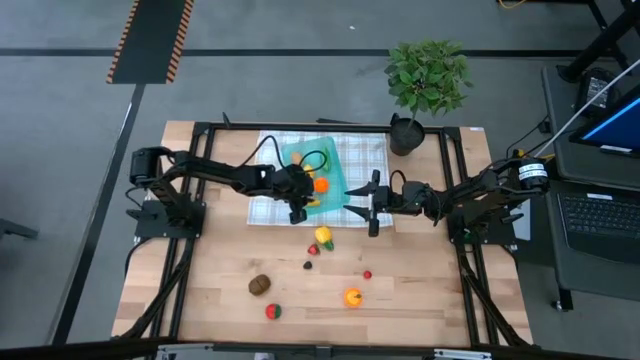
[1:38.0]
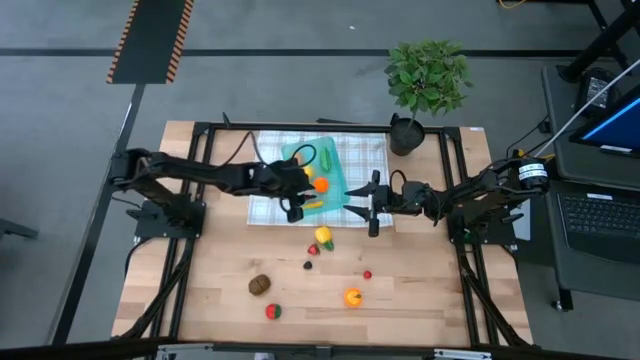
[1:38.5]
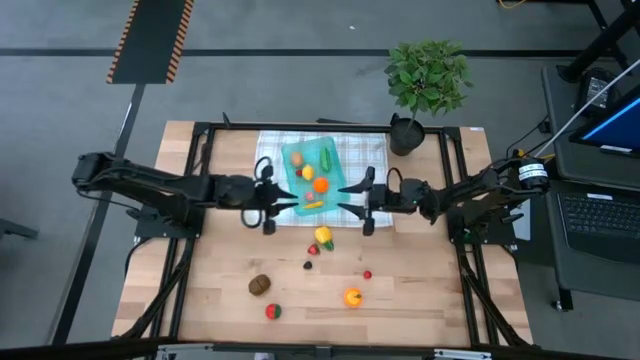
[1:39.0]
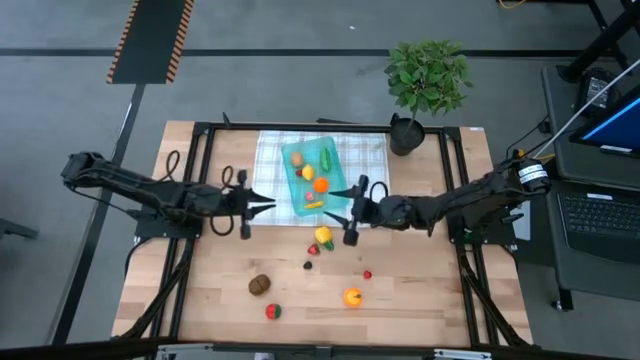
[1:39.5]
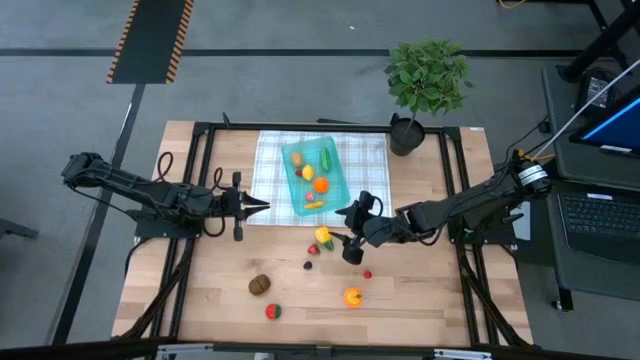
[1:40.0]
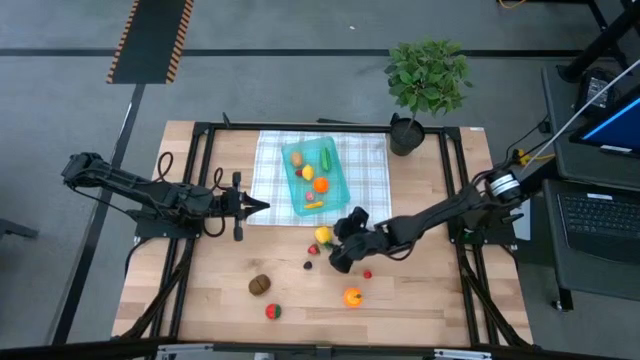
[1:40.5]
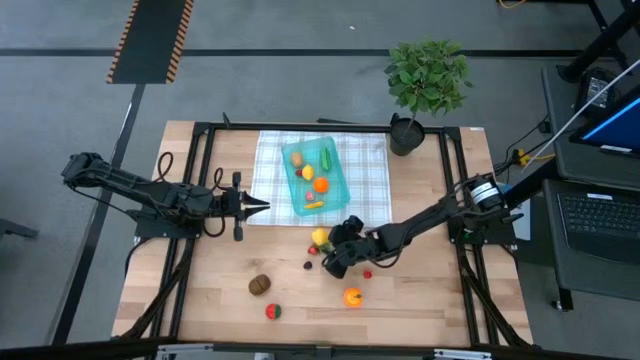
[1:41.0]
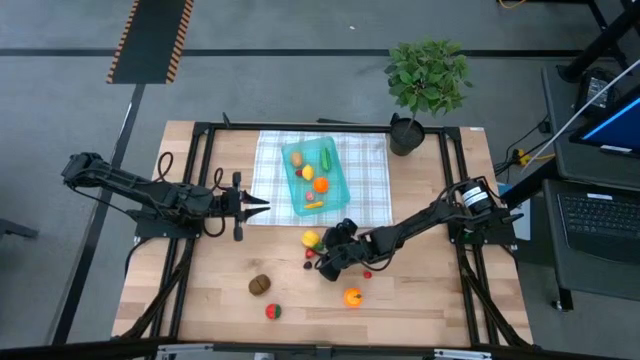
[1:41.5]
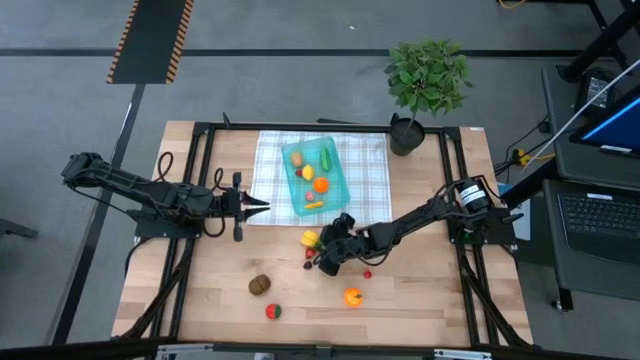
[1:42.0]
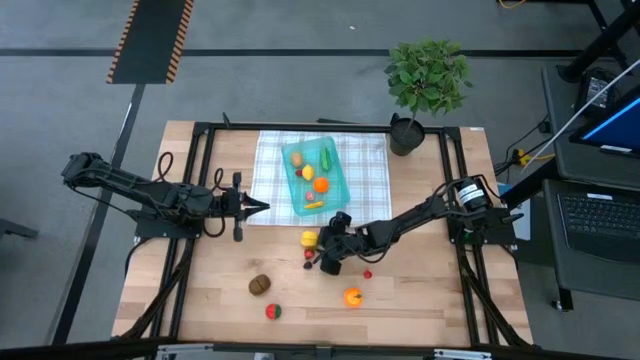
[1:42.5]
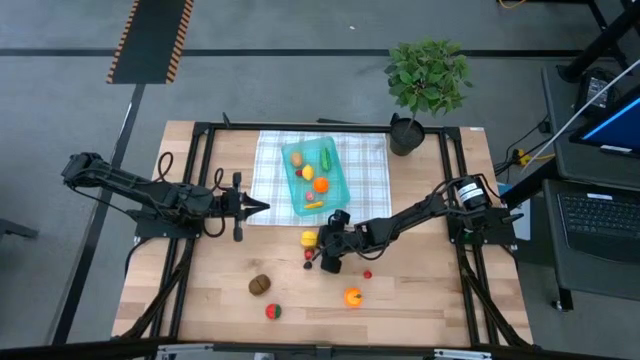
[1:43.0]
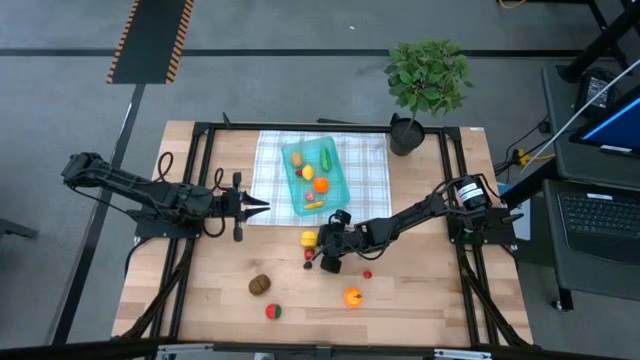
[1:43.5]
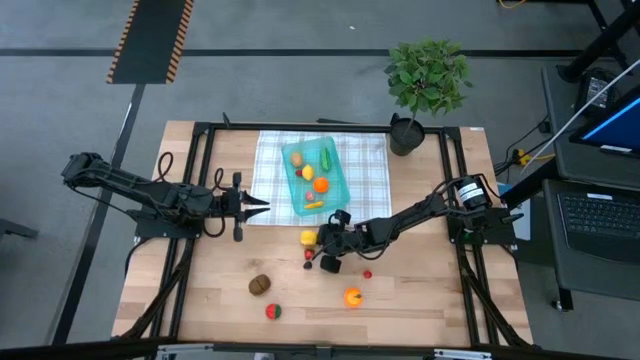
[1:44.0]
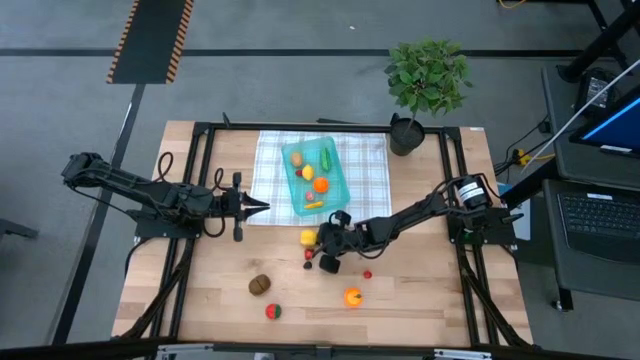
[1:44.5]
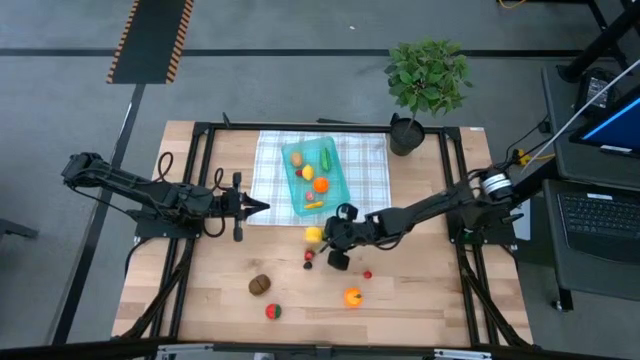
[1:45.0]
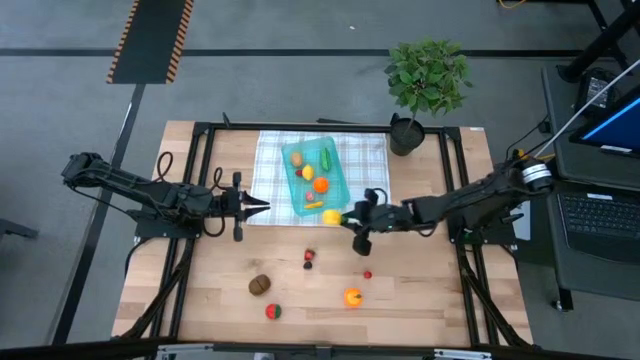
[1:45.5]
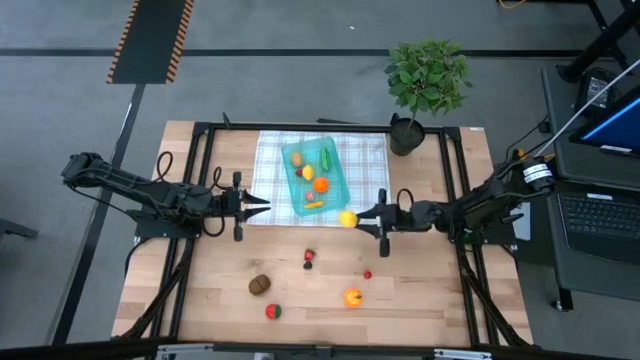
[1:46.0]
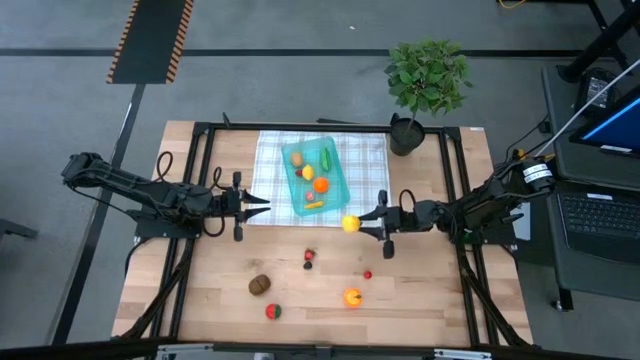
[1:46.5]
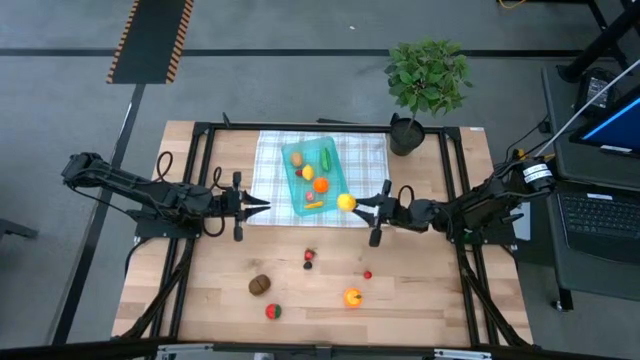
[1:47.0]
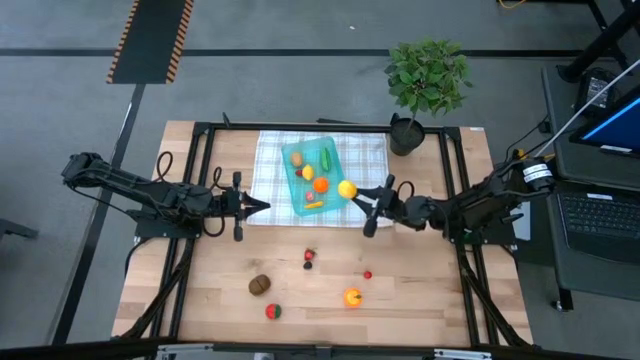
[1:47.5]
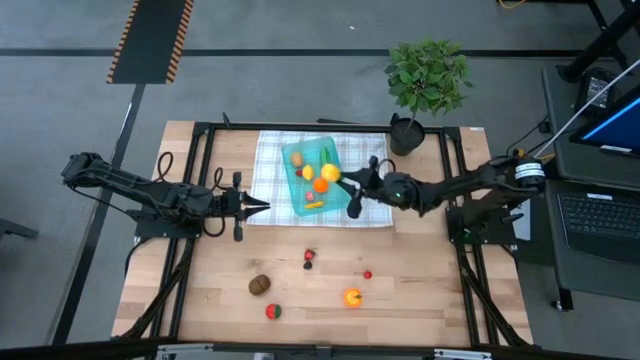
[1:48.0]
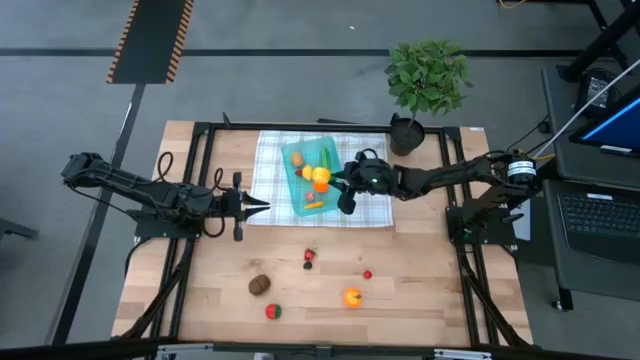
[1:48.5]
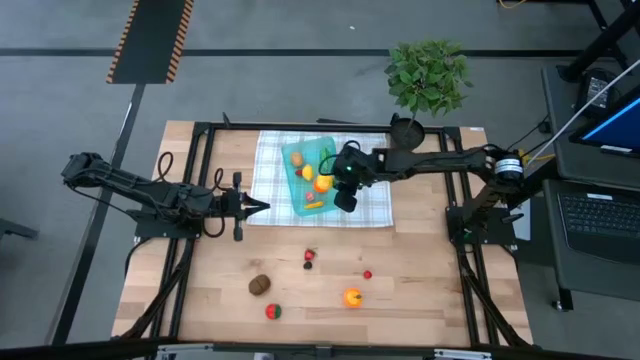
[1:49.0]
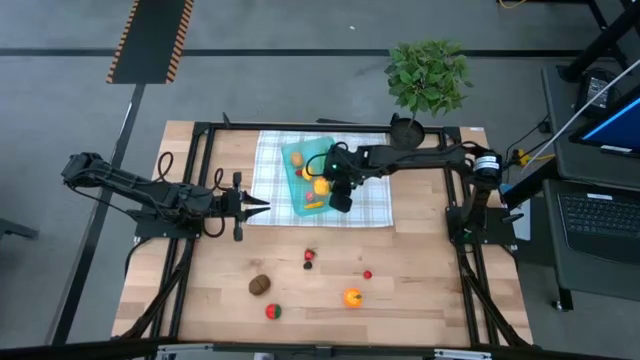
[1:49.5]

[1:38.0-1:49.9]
Task: Pick and placing Produce into tupperware
Put the yellow pineapple into the blue bin

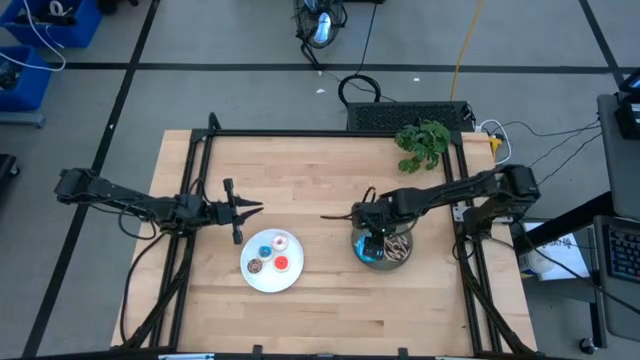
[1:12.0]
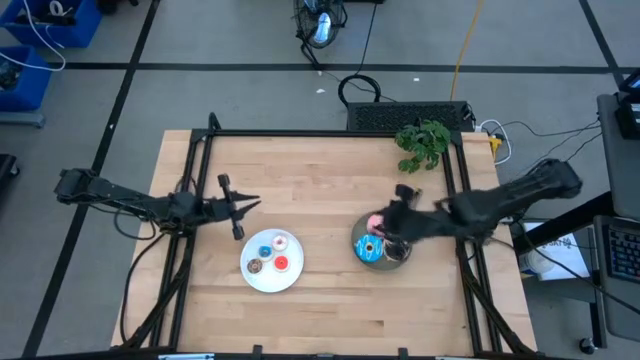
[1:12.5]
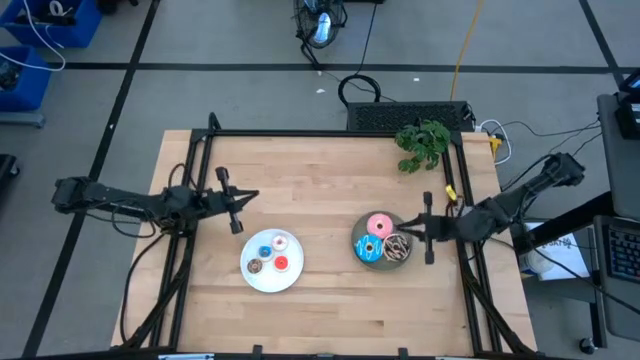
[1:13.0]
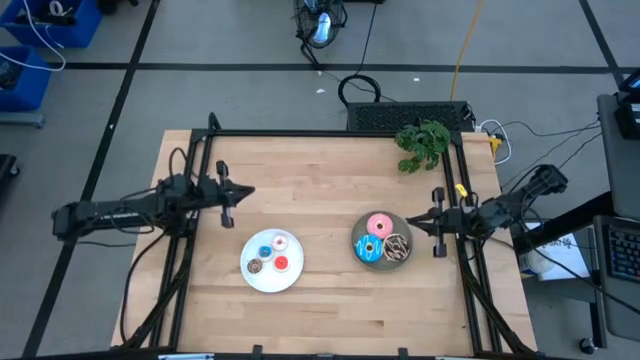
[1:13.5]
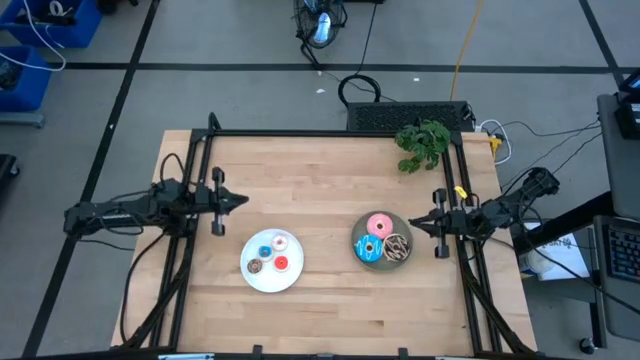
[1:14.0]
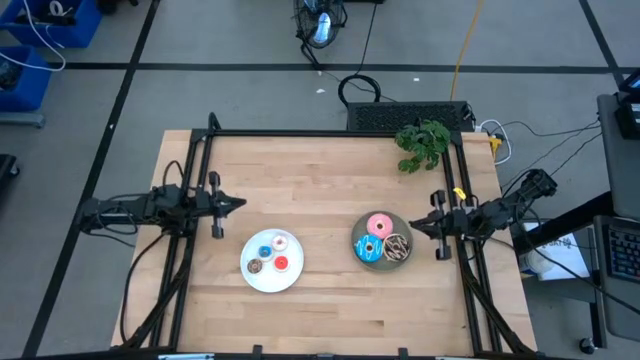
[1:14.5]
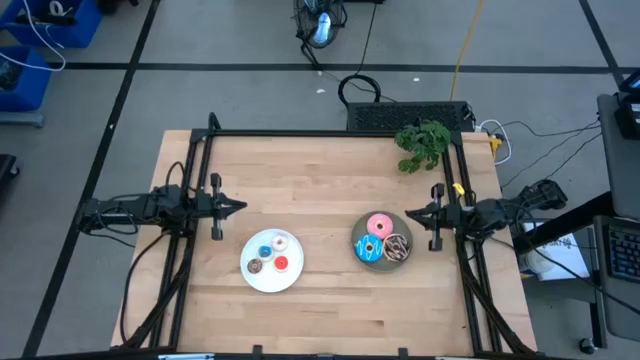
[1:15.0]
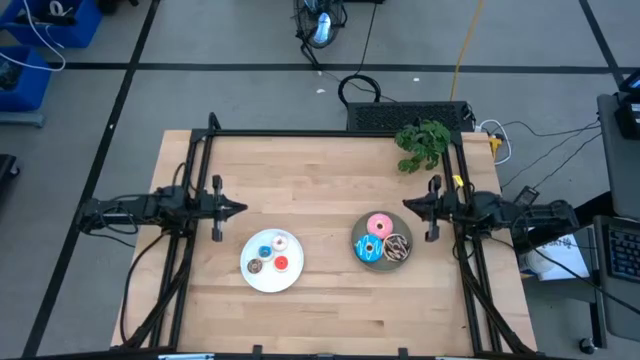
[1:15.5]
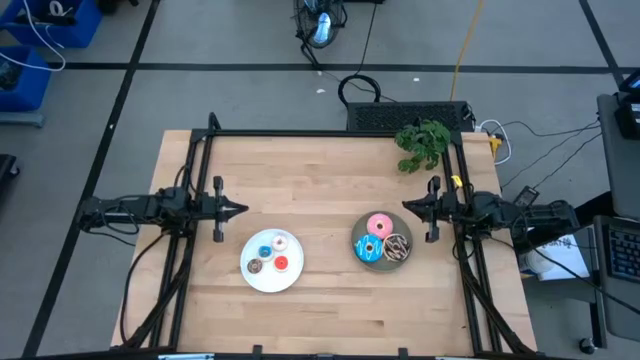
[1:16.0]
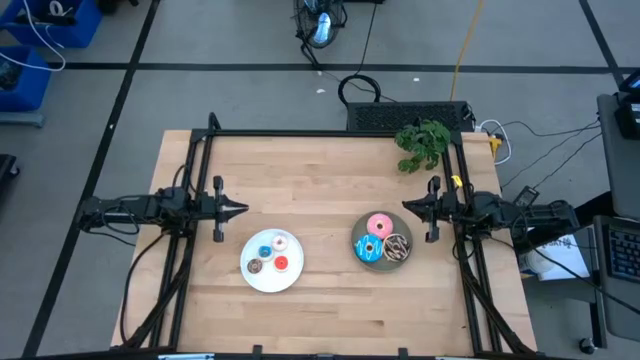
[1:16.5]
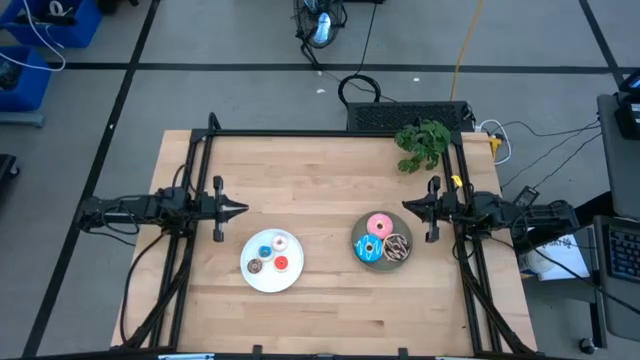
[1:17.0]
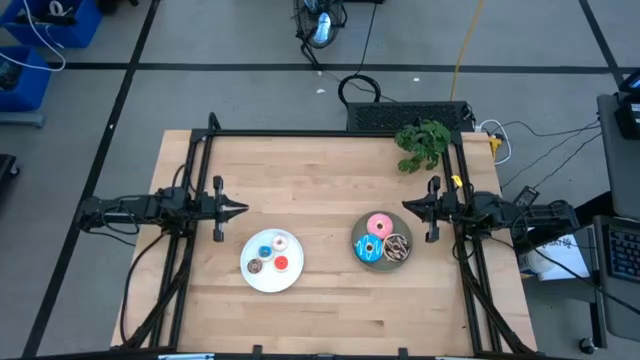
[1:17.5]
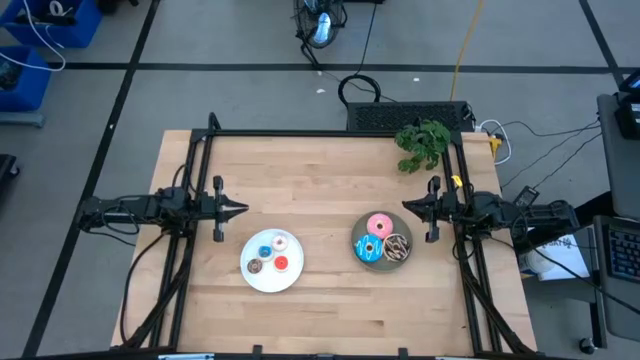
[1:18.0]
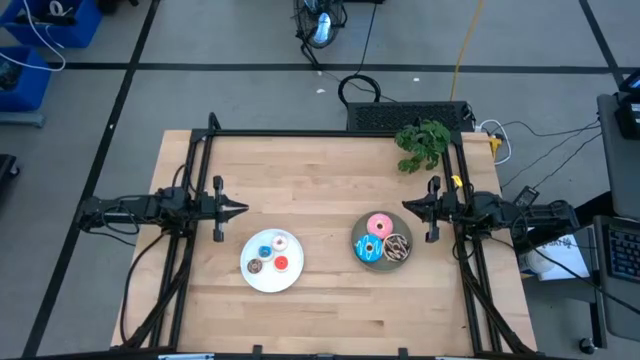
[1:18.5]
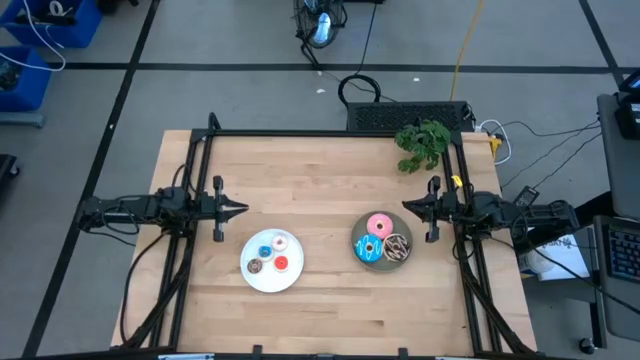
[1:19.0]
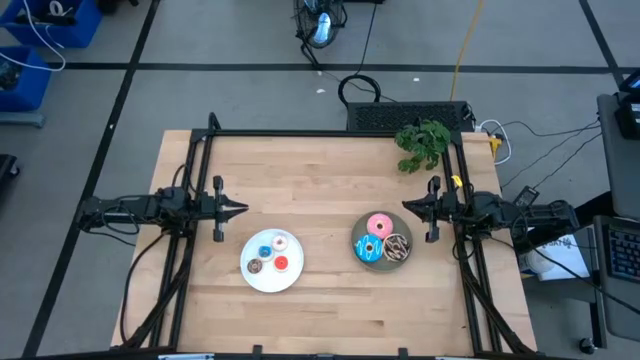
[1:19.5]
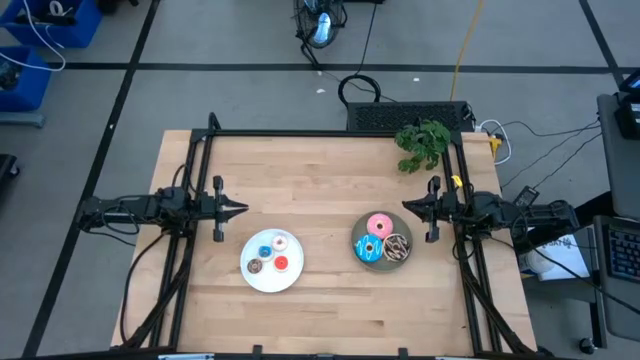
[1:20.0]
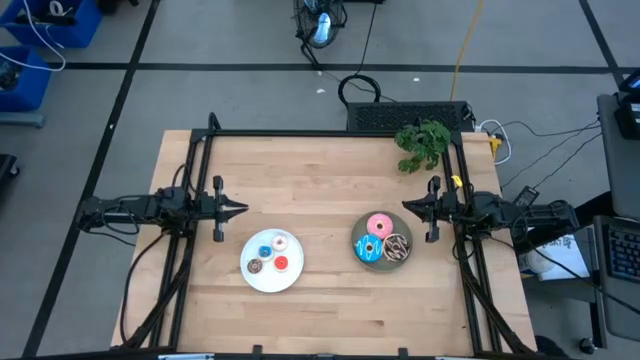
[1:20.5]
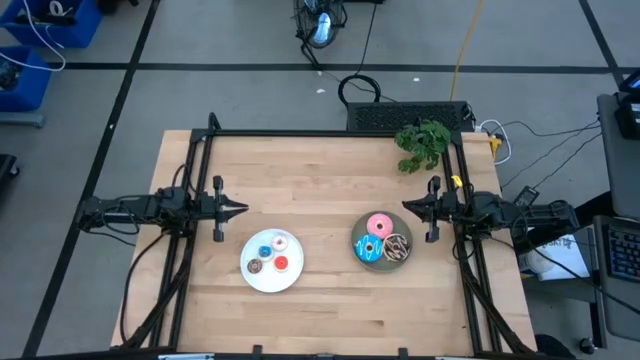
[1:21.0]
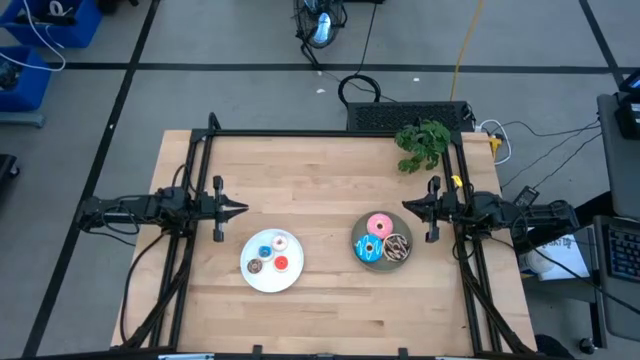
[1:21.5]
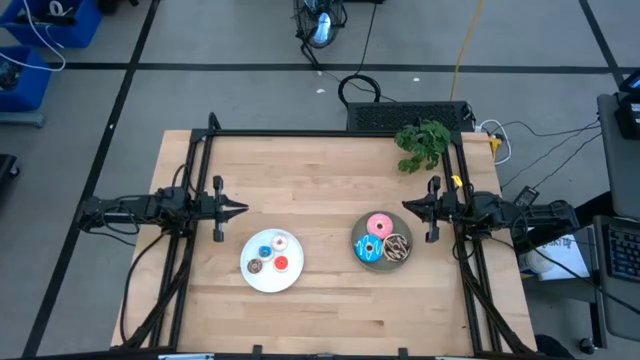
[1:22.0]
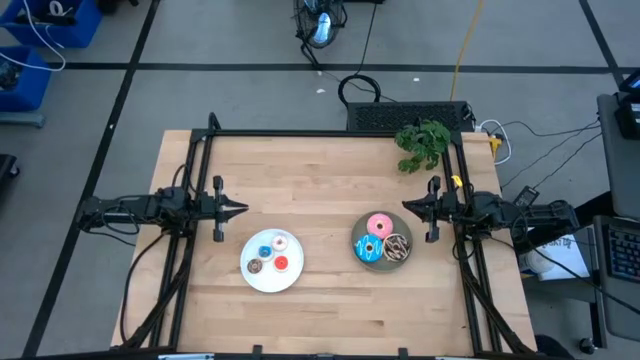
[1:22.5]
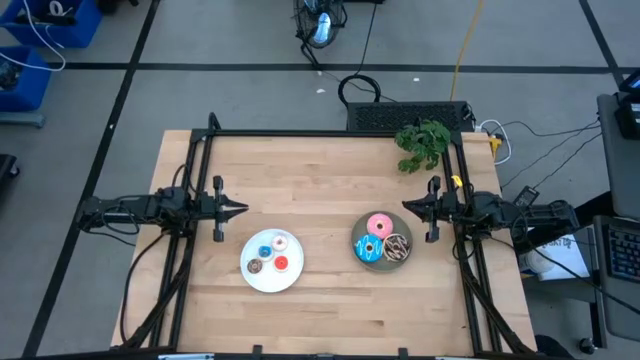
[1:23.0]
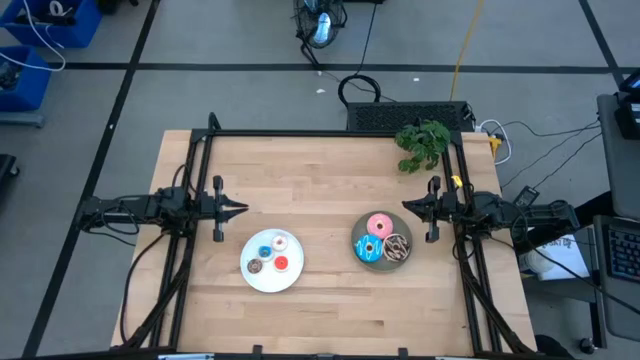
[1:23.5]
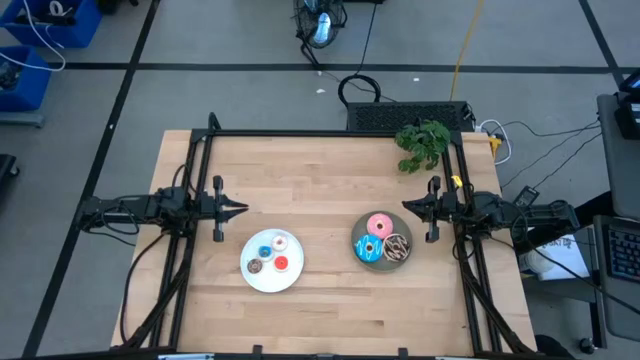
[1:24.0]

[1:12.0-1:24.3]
Task: Pick & Place donuts
Return to Home Position
